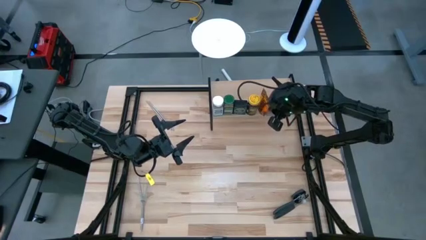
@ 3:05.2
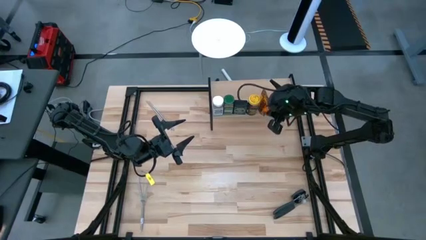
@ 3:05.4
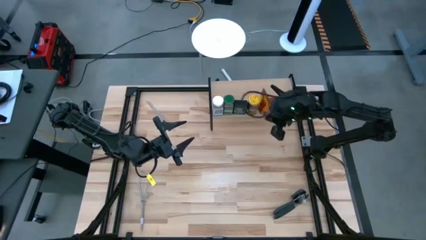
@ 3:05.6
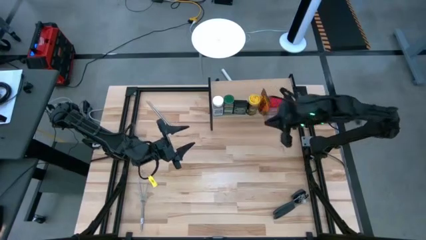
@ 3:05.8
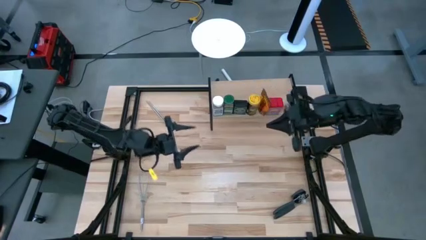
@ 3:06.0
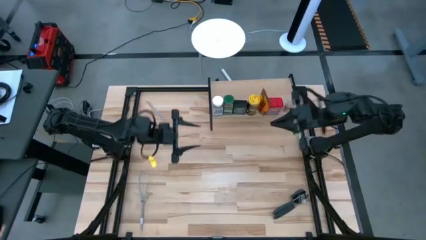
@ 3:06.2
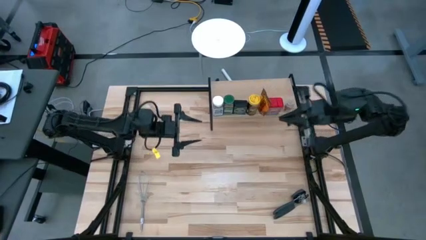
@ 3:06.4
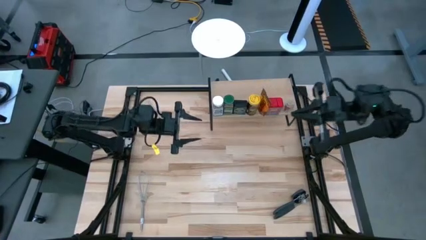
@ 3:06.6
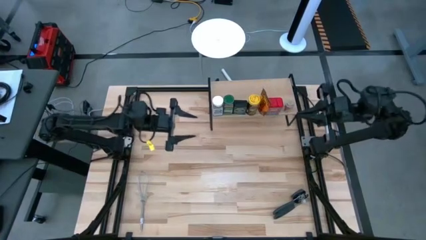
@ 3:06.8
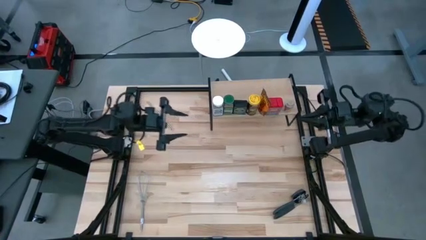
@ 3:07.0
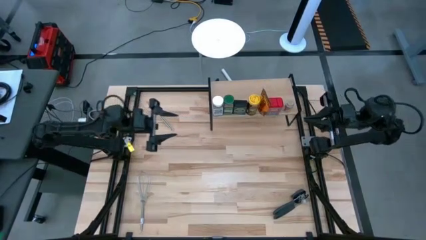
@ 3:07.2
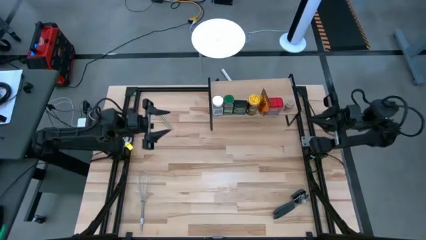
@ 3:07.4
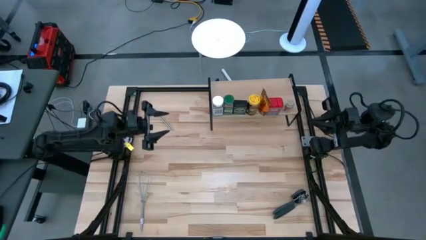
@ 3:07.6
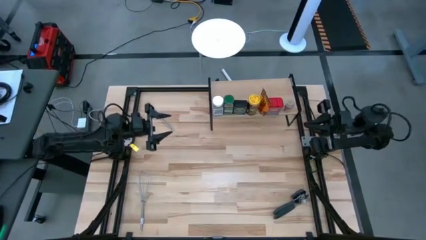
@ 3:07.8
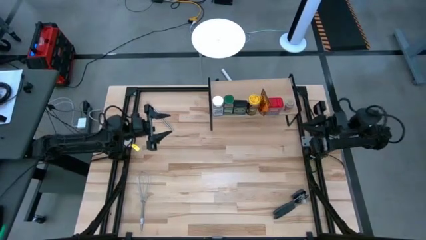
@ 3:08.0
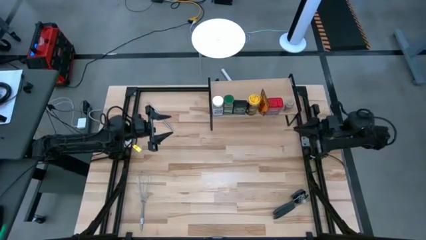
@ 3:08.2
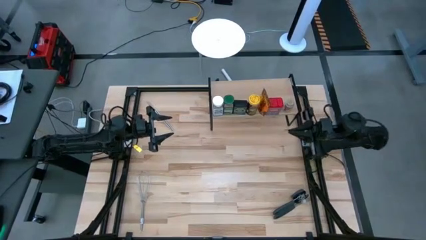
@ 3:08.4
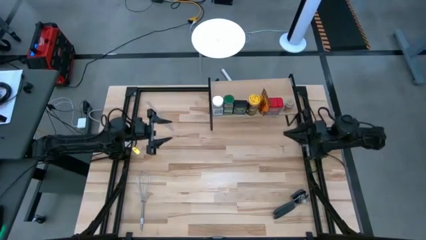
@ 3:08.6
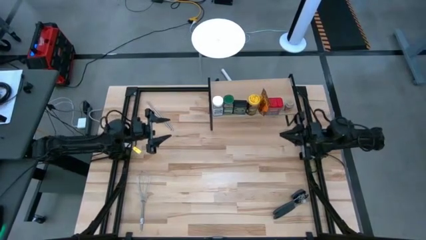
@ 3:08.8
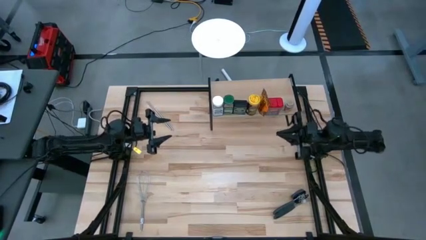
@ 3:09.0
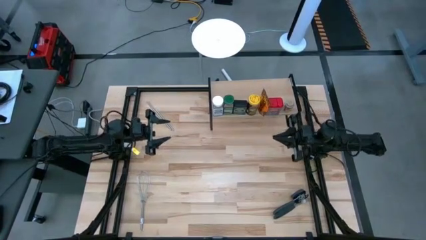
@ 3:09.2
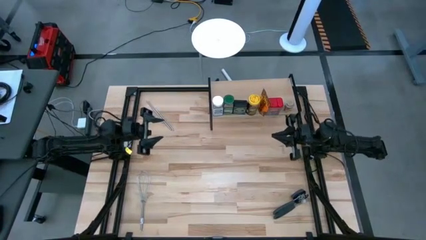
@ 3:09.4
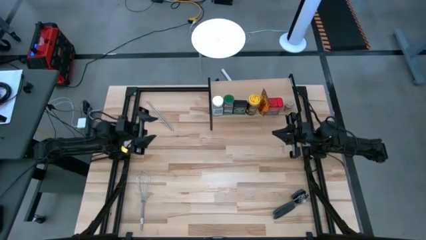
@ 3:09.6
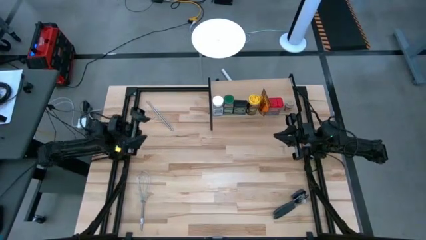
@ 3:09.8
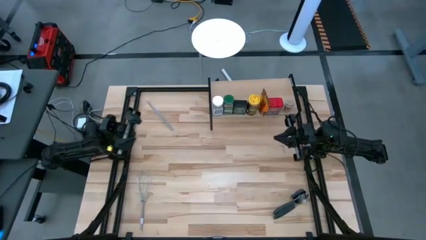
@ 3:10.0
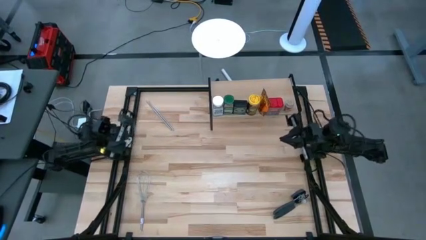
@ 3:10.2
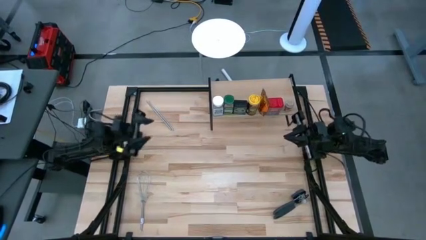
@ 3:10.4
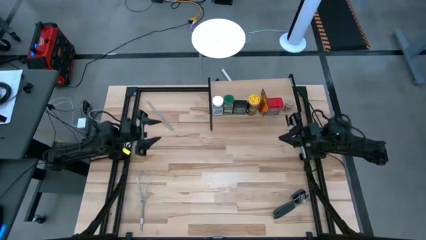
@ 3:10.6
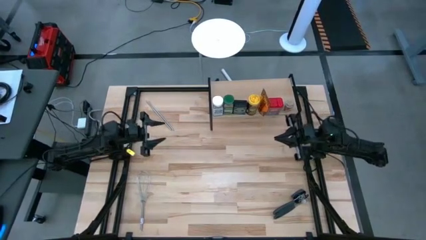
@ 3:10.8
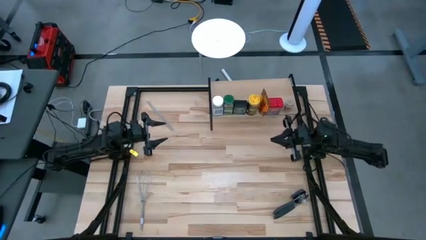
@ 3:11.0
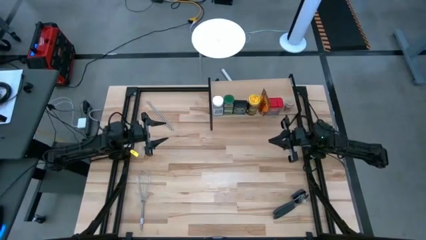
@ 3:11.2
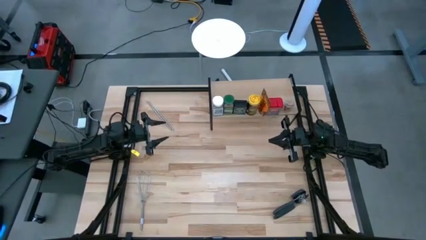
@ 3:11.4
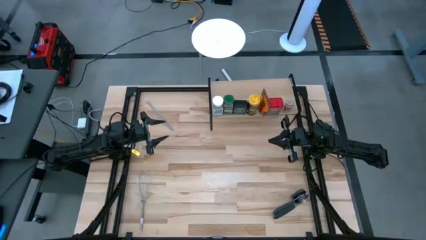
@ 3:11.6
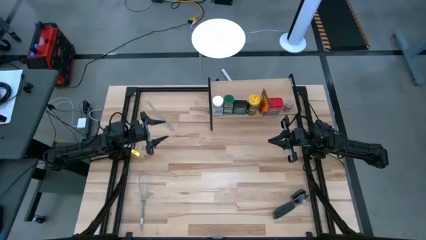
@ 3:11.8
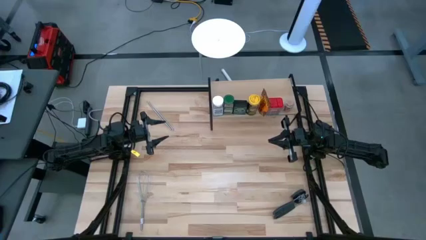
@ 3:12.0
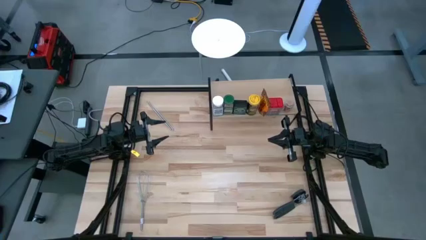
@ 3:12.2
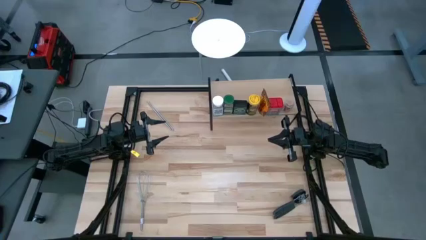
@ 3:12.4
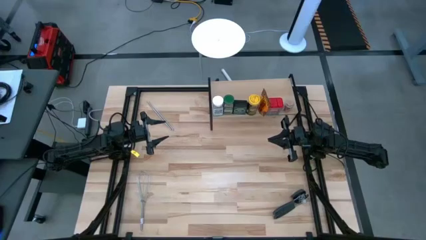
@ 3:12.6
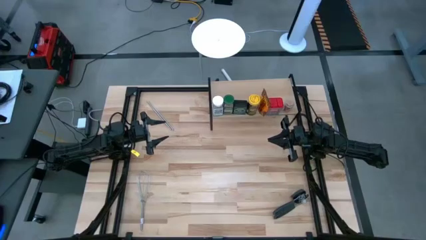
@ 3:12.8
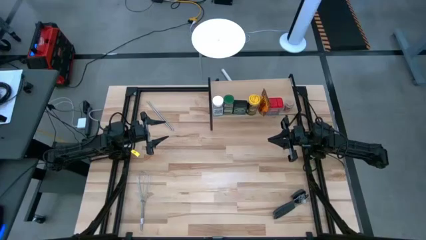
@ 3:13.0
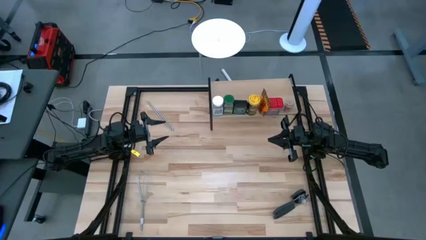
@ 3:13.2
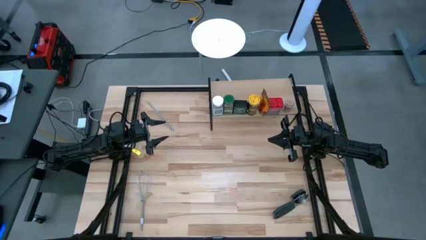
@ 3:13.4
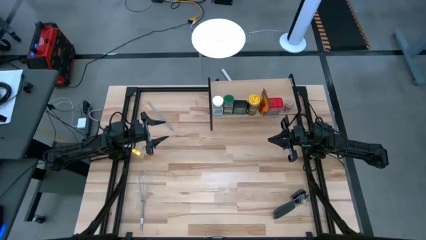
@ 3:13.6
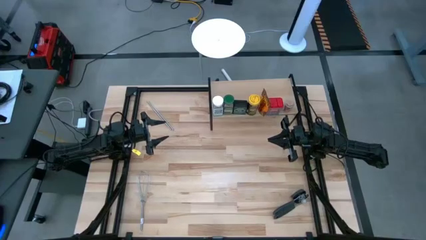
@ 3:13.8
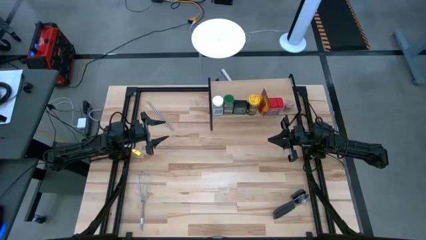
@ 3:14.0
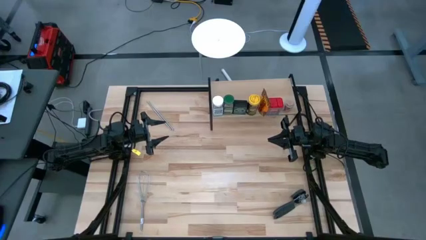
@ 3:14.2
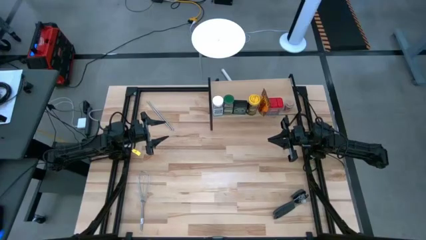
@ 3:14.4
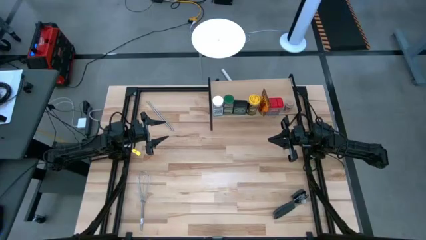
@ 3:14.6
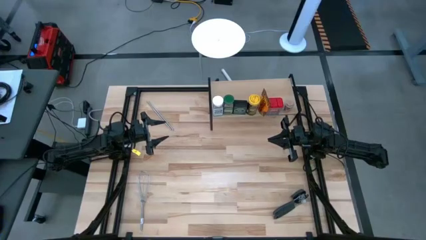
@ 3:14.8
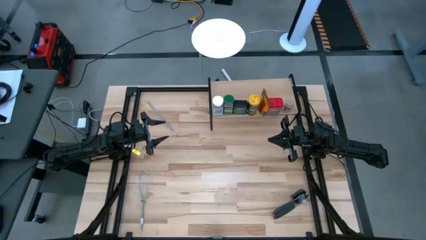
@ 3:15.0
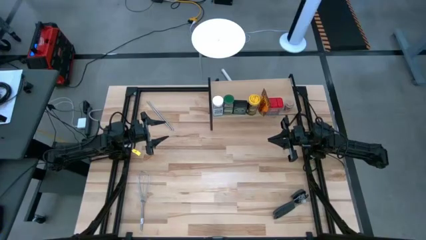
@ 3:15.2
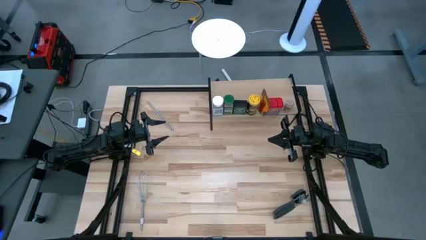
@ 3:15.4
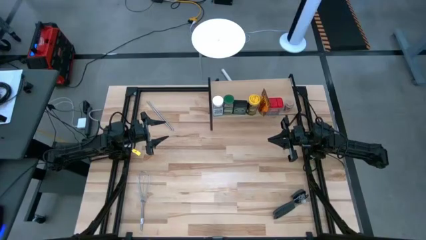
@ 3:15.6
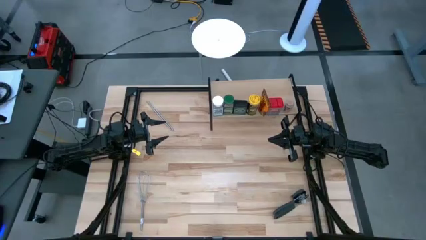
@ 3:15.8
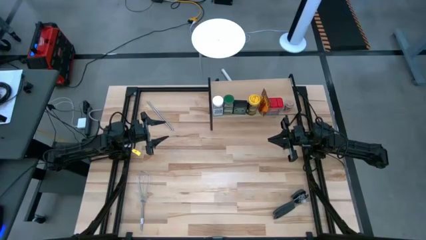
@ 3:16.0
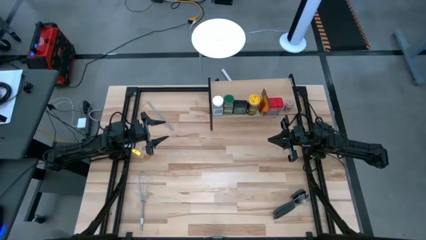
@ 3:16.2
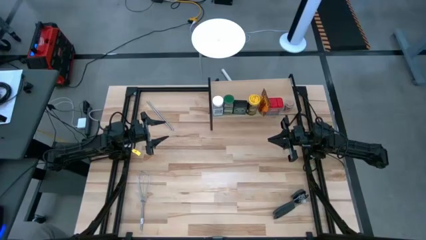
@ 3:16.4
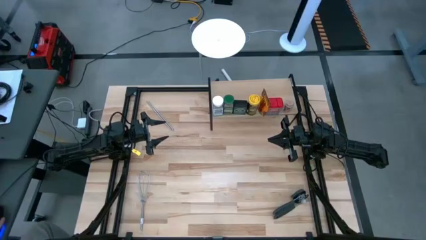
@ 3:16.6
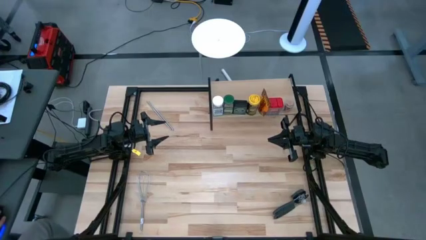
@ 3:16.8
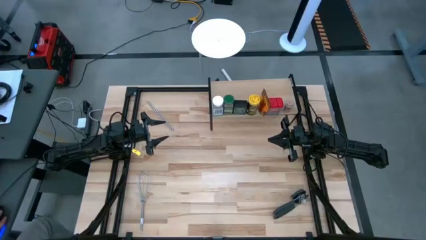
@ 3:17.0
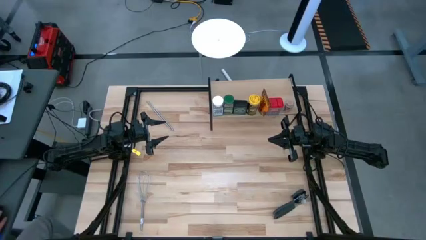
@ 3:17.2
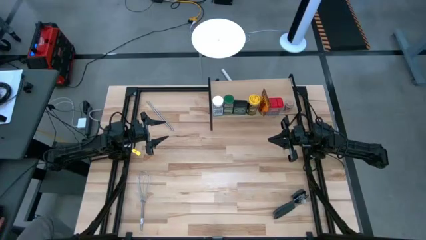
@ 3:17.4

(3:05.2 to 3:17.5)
Task: Shelf spices
Return to Home Position

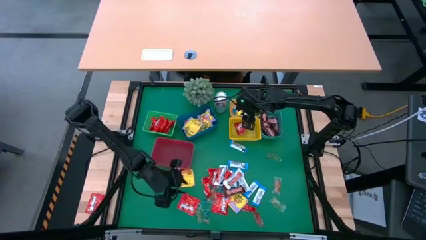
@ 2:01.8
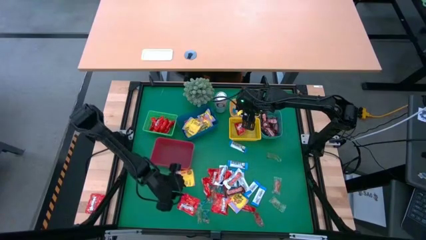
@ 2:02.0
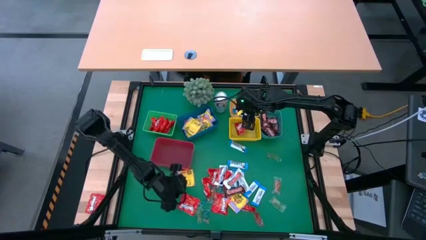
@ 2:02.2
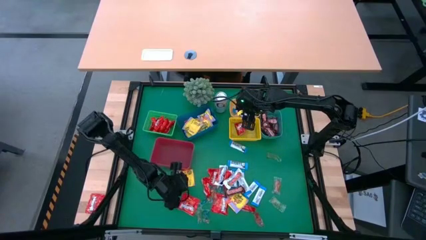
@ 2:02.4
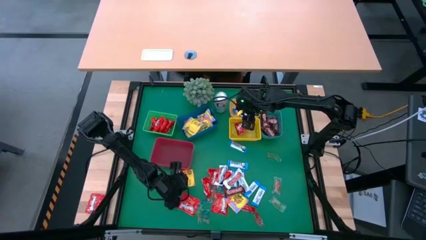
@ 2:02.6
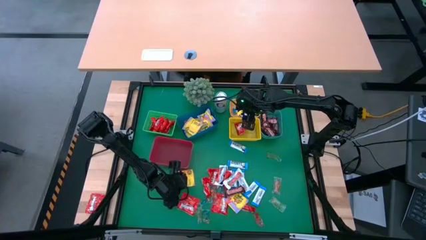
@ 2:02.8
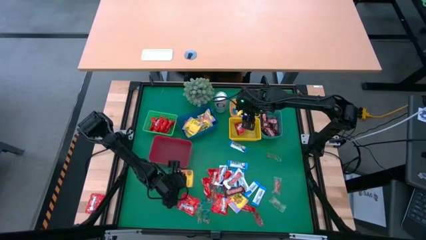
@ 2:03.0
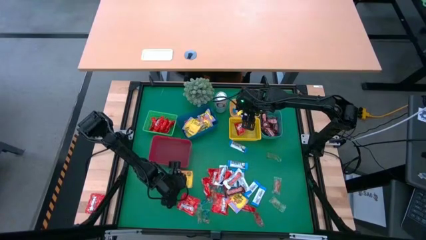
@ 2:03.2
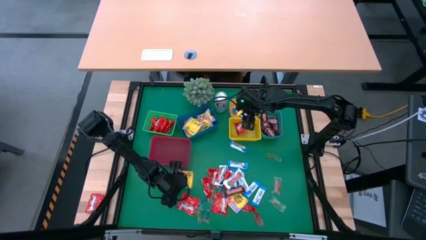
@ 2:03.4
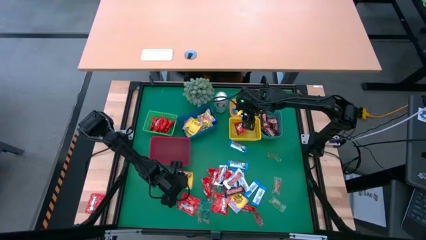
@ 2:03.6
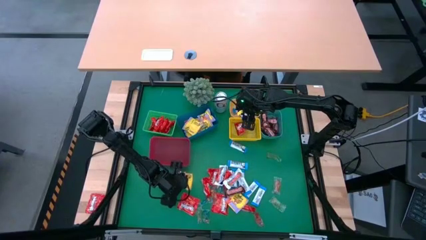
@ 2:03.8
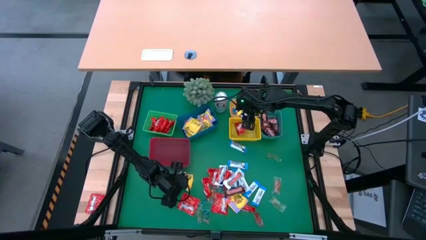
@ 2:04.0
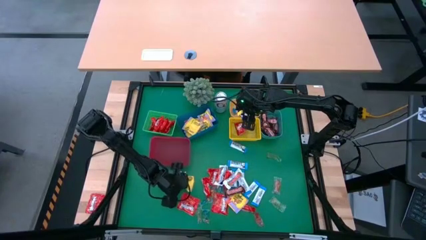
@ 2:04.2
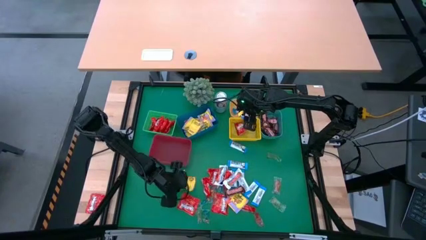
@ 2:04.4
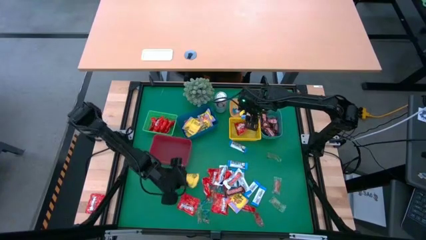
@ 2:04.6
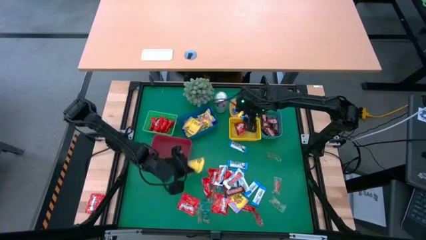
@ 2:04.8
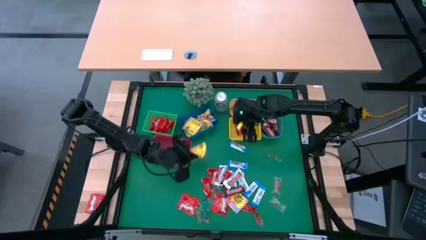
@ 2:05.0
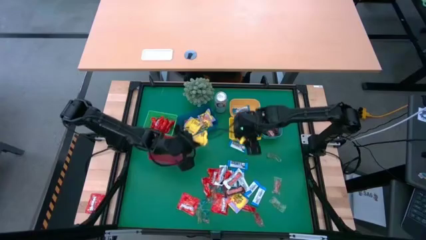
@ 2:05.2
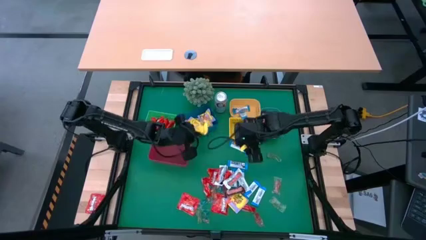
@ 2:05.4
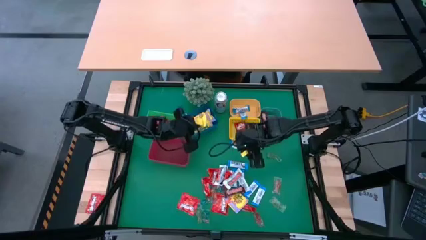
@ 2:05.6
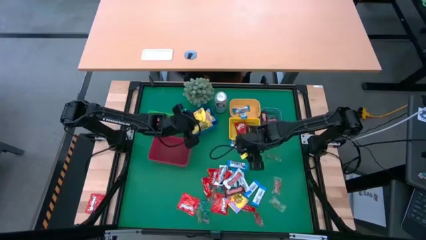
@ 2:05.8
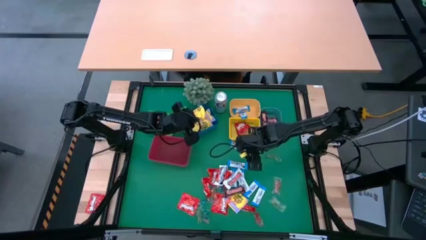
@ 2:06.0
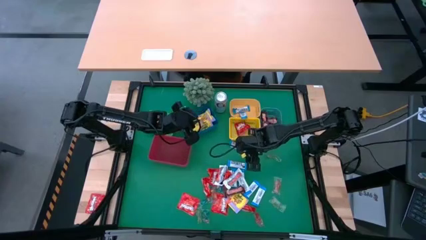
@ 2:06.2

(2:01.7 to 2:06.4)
Task: Sort candy
Put the yellow candy pack into the blue bin
